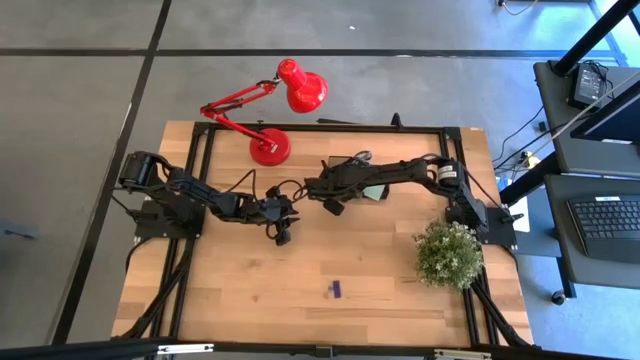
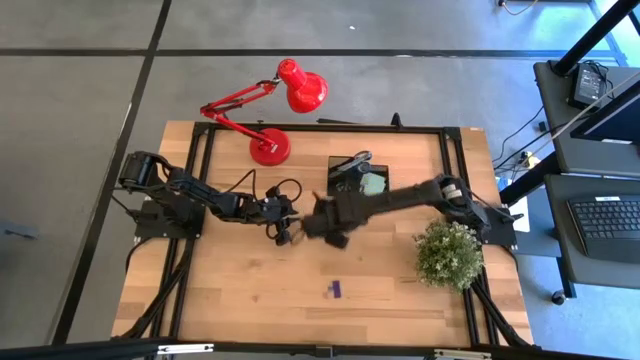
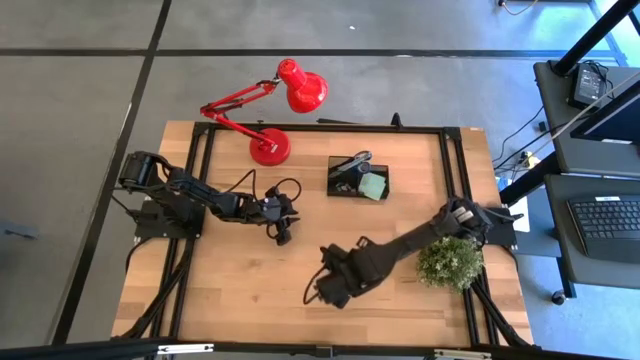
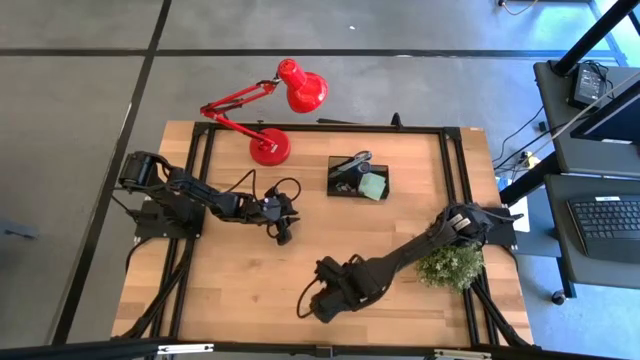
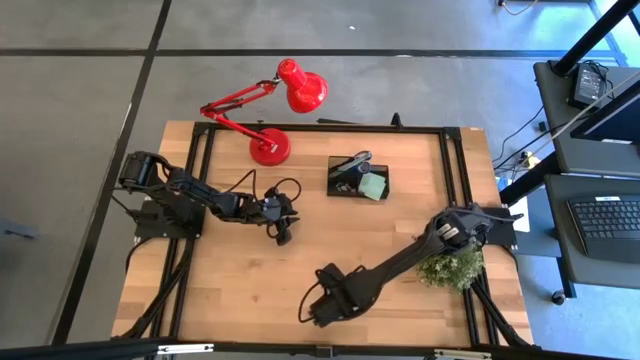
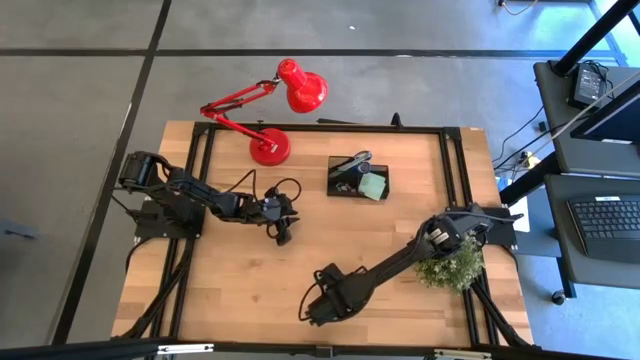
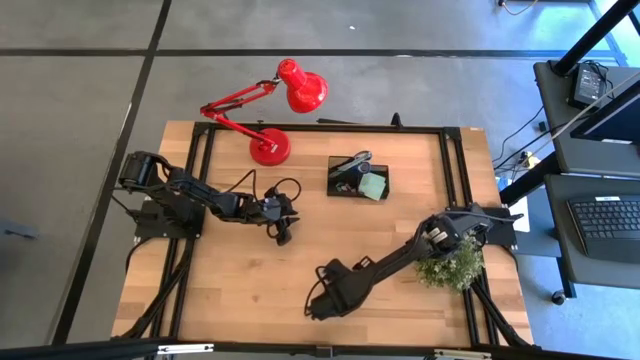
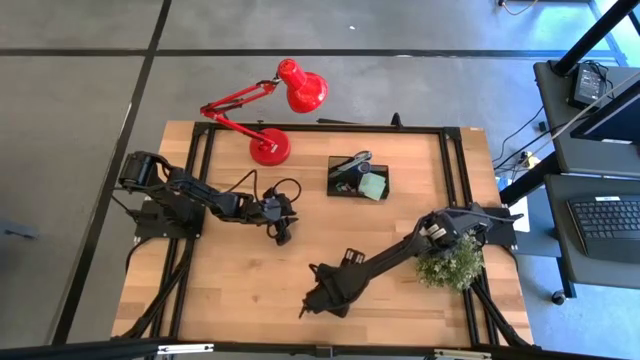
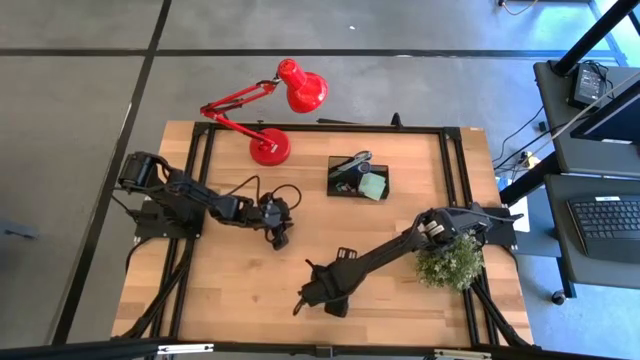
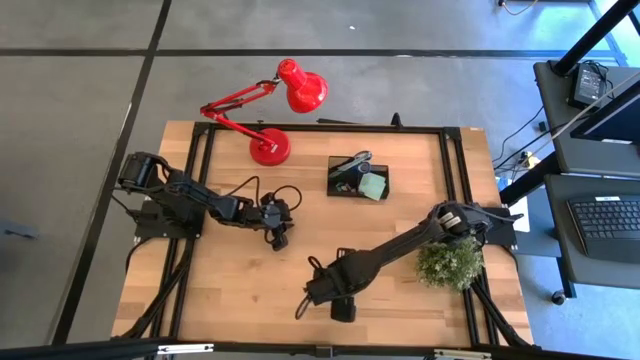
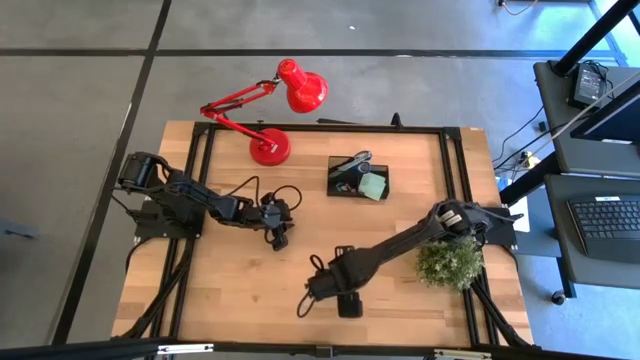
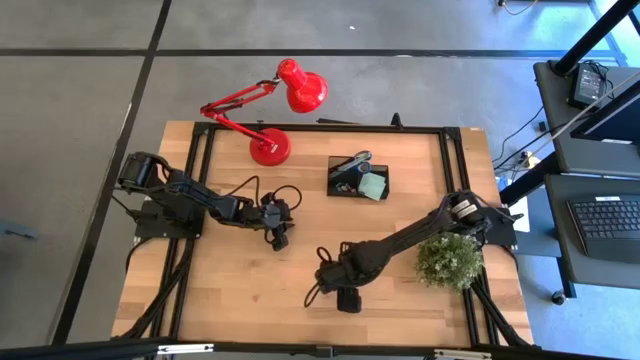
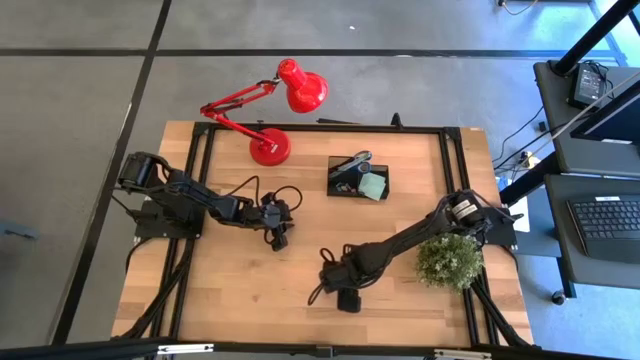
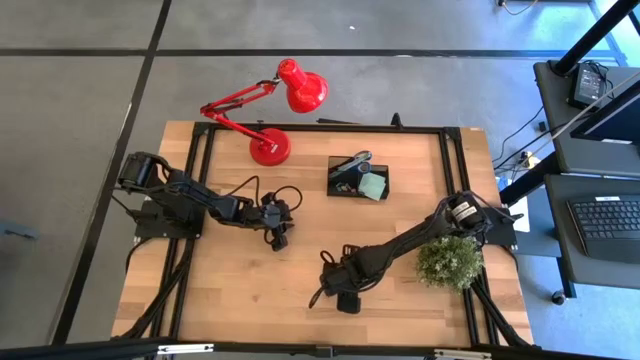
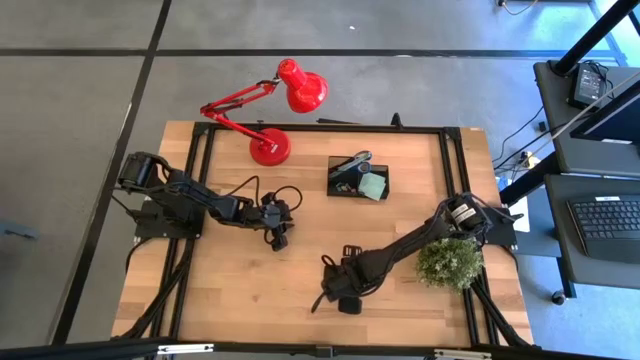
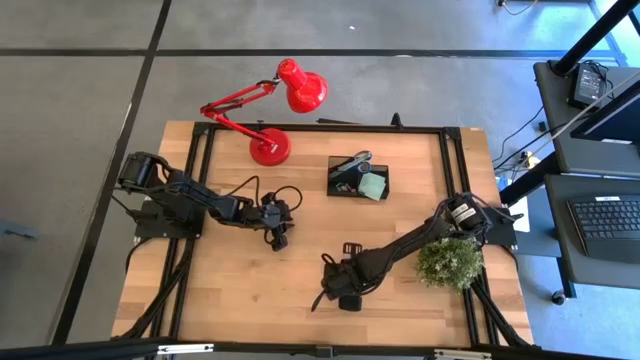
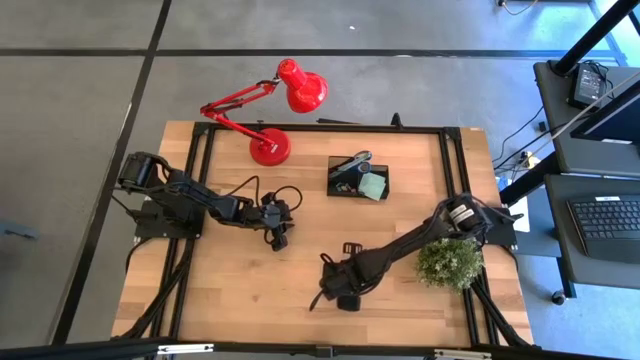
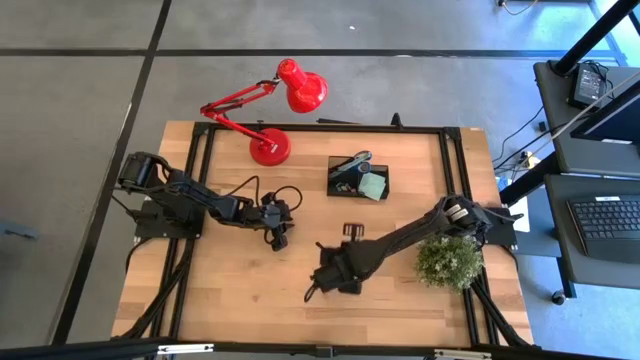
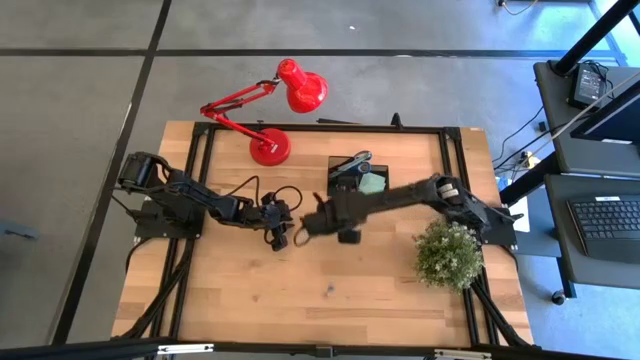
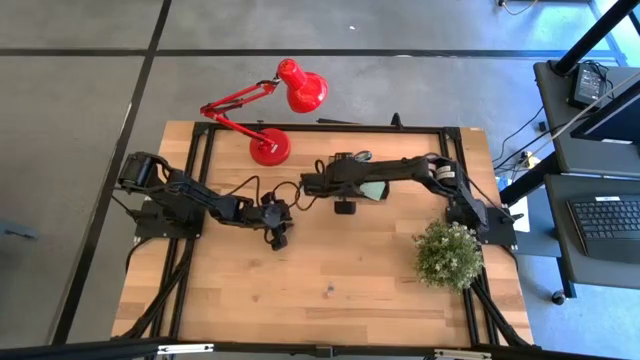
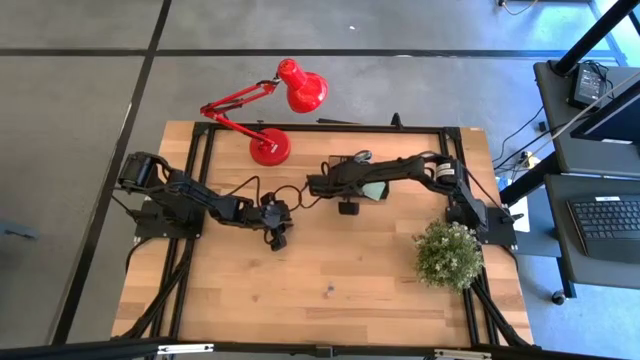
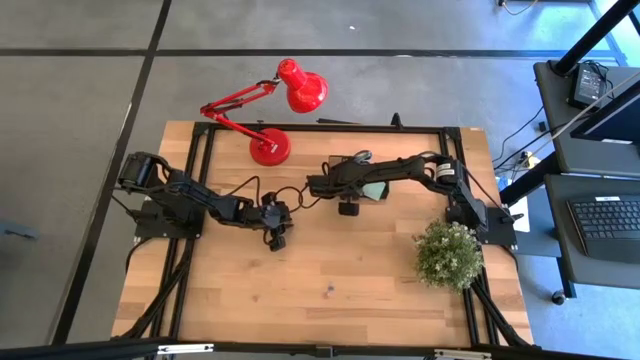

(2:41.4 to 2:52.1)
Task: Pick and place office supplies into organizer
Put the blue eraser into the black desk organizer

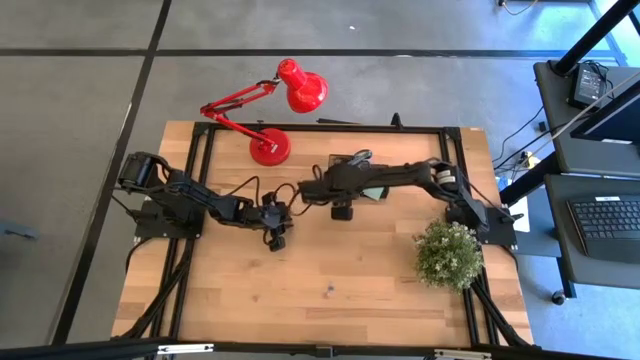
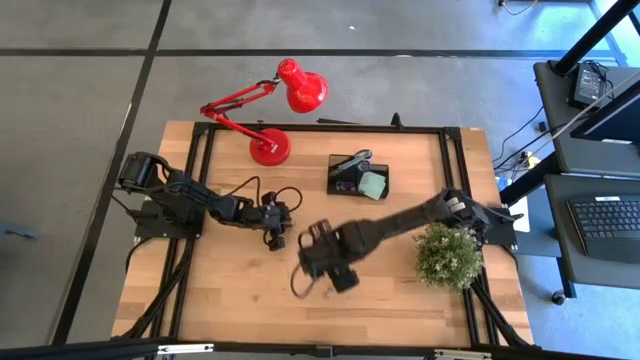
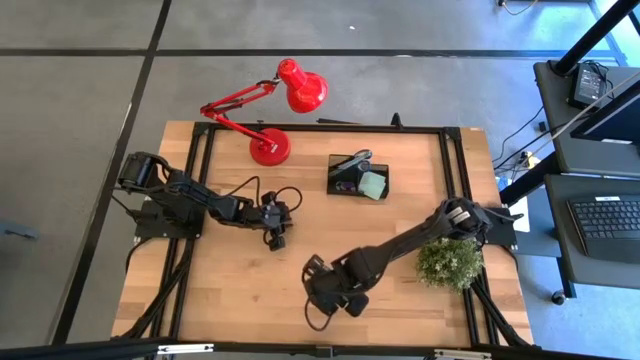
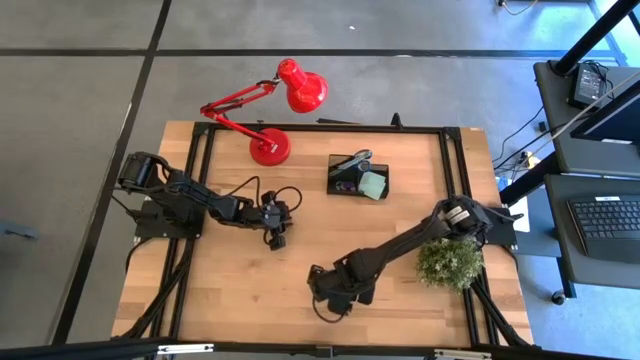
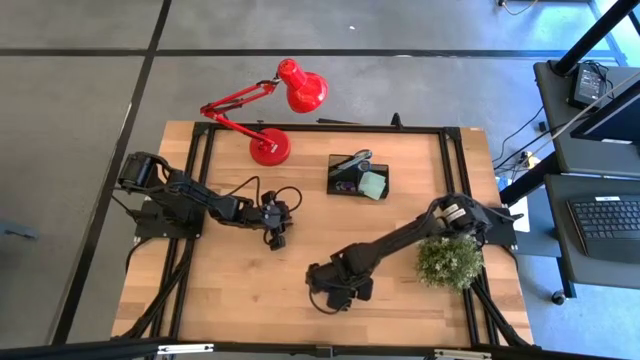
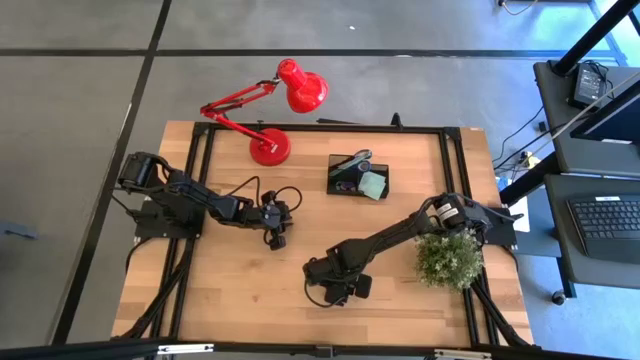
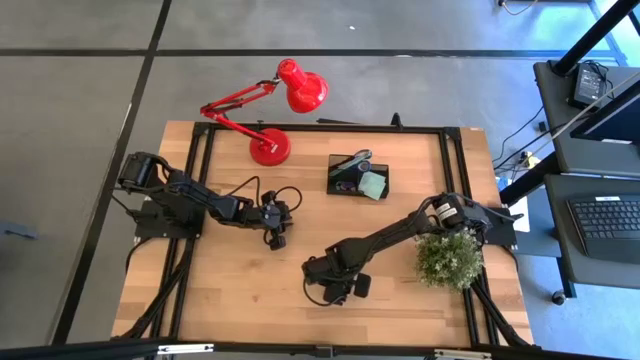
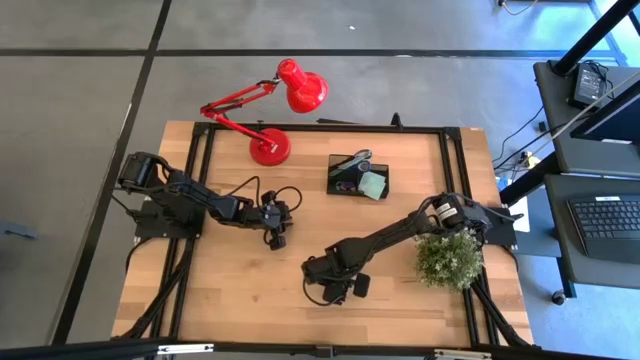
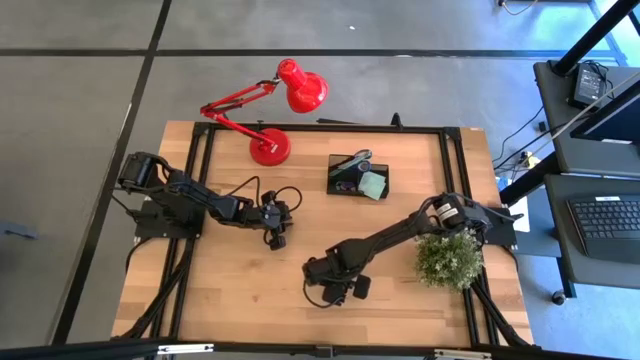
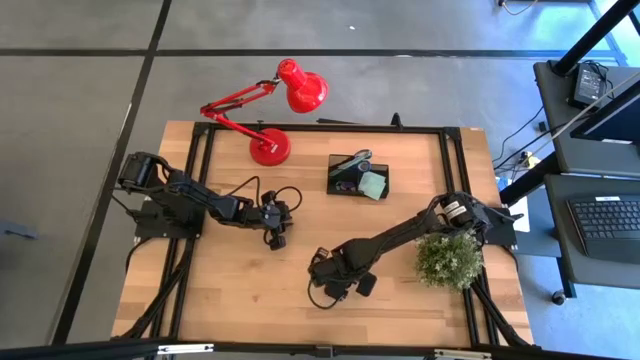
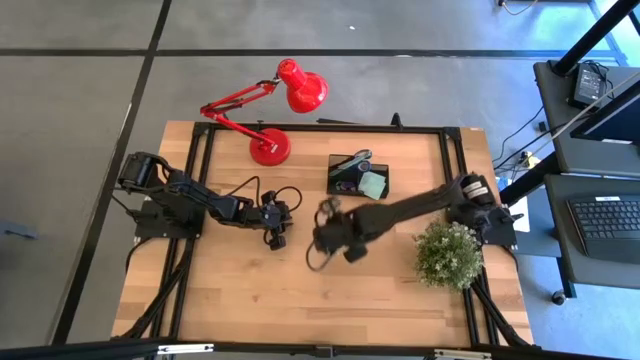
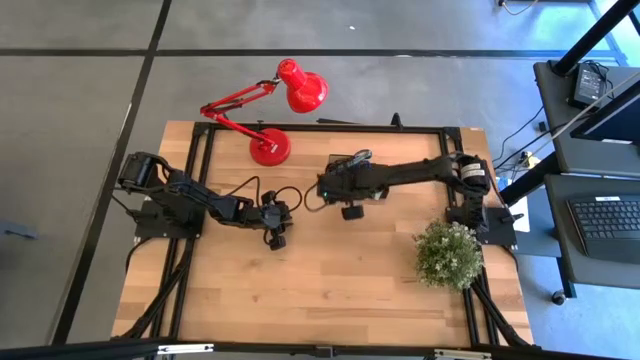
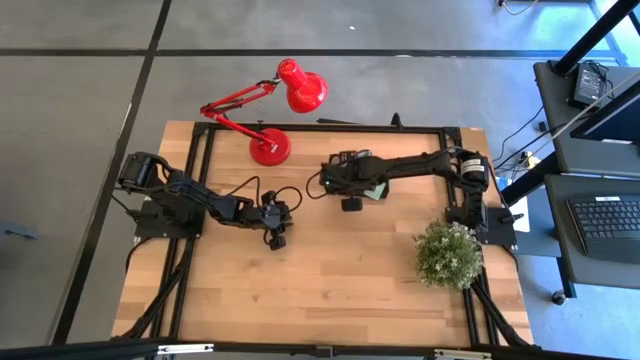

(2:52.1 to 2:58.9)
Put the blue binder clip into the black desk organizer

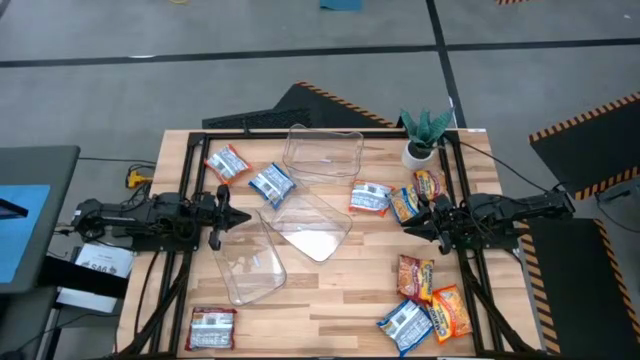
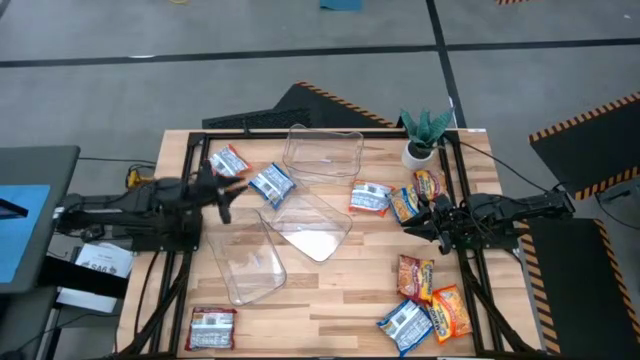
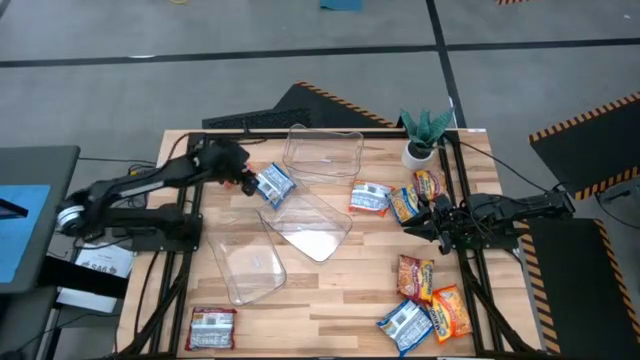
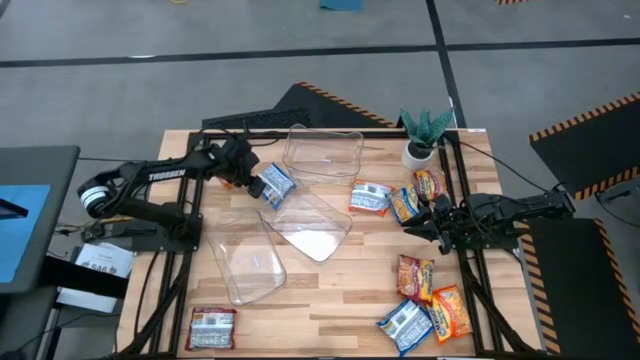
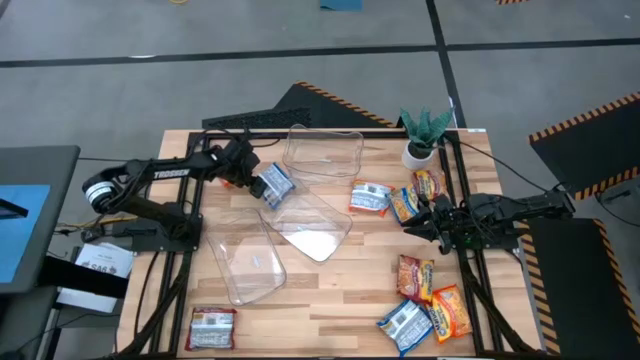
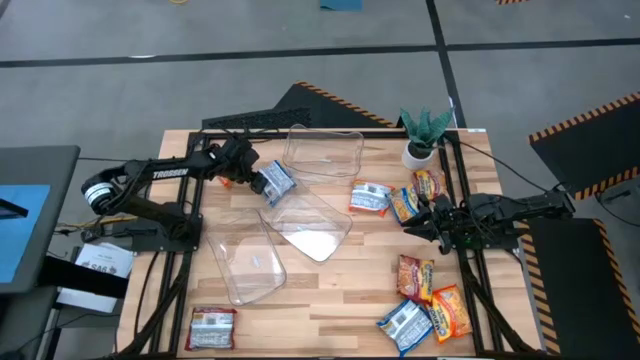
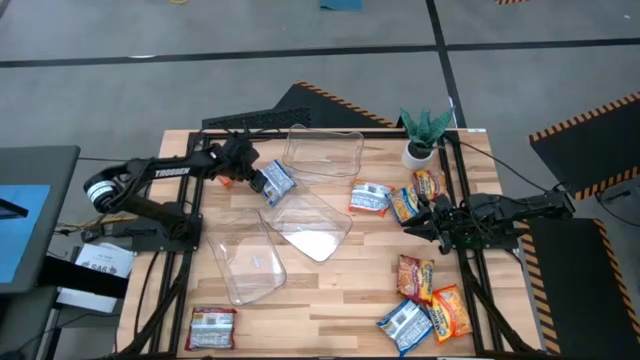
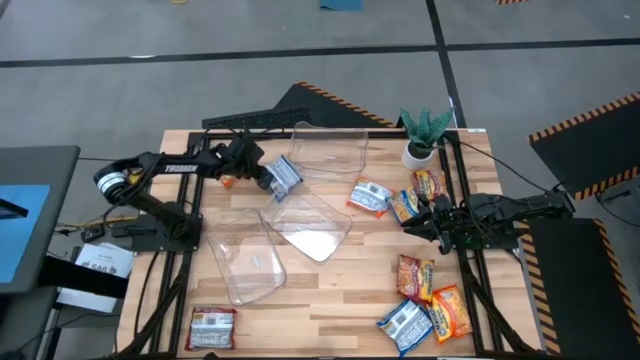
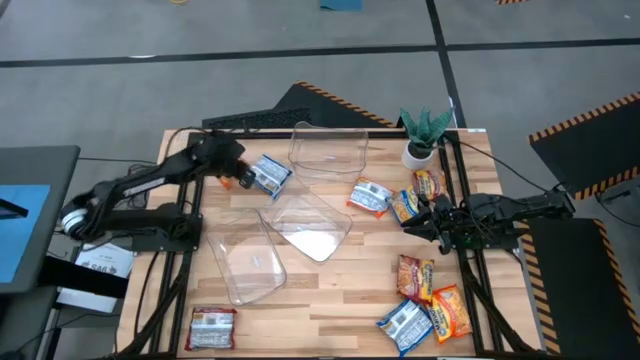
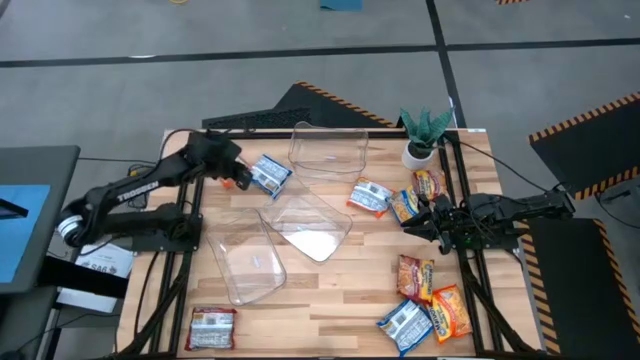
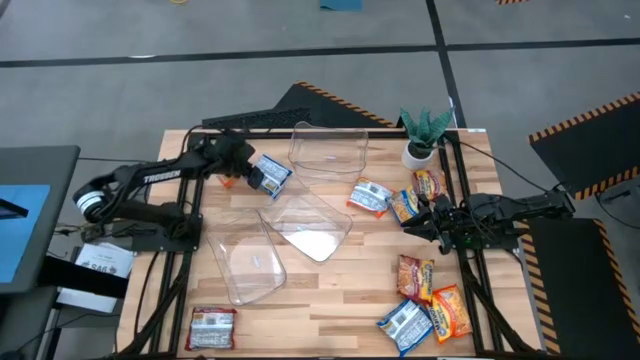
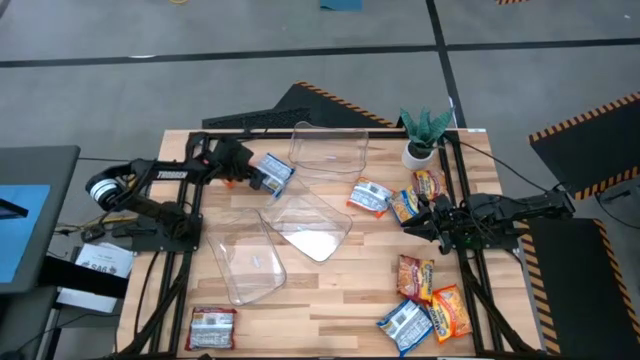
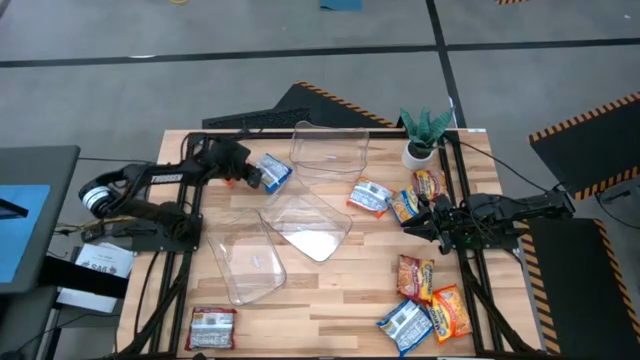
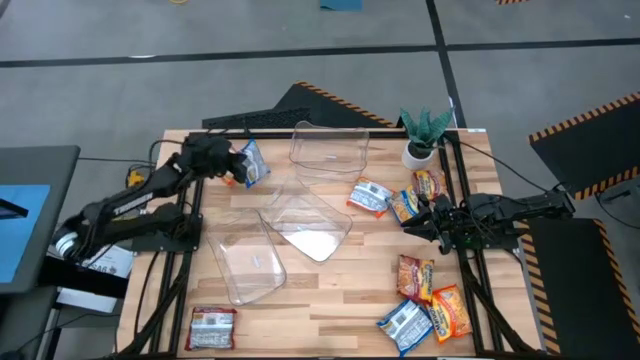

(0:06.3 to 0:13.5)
Task: Sort Maruchan noodles
Put the top left blue noodle pack into the bottom transparent bin
